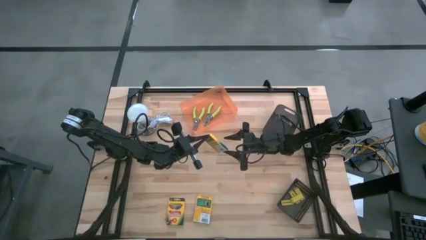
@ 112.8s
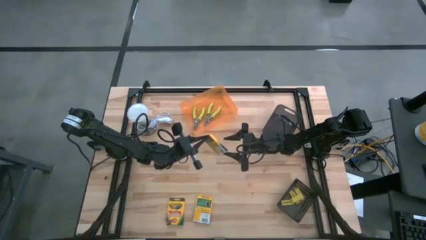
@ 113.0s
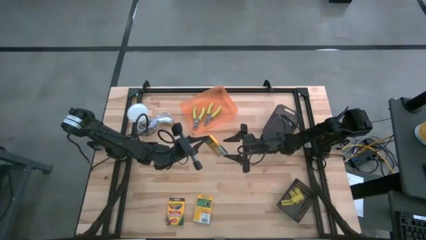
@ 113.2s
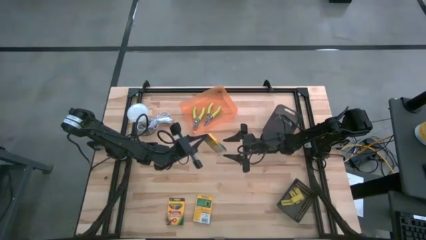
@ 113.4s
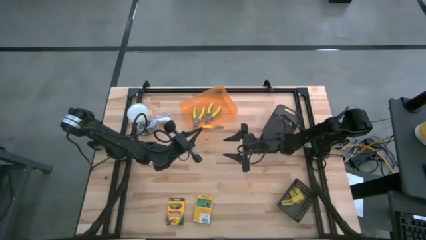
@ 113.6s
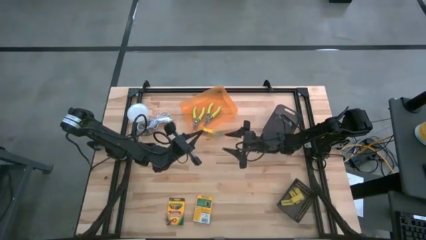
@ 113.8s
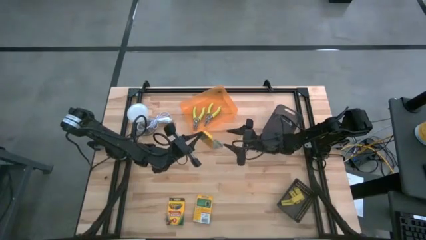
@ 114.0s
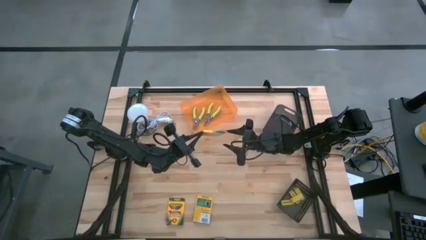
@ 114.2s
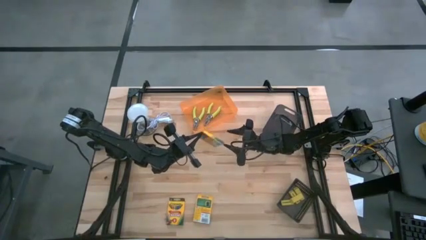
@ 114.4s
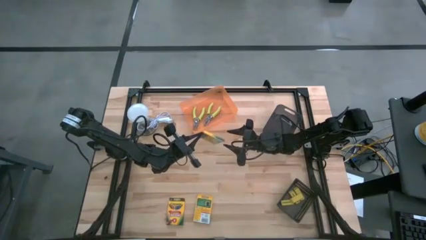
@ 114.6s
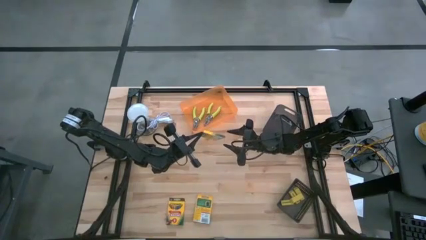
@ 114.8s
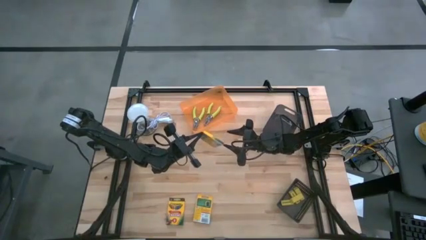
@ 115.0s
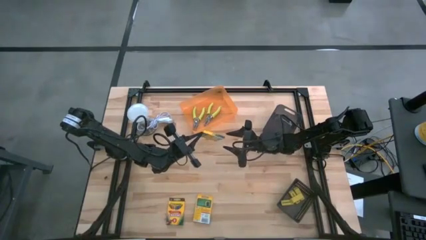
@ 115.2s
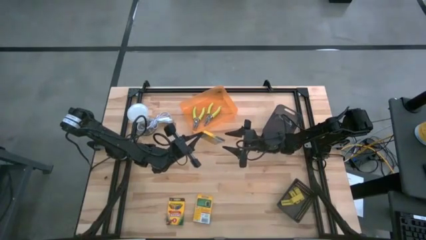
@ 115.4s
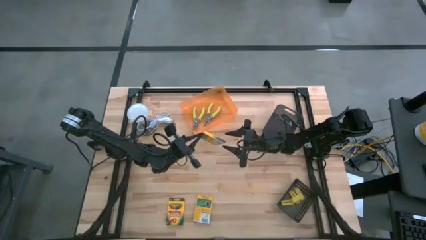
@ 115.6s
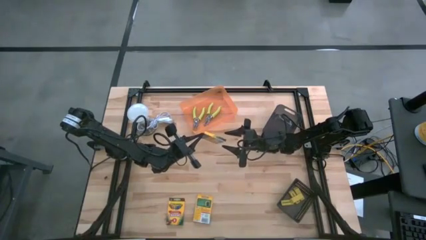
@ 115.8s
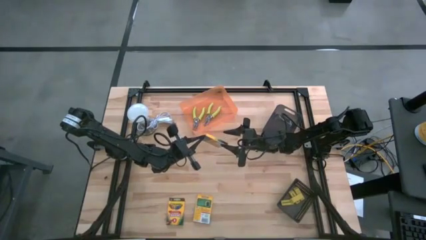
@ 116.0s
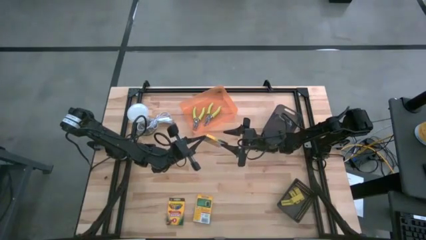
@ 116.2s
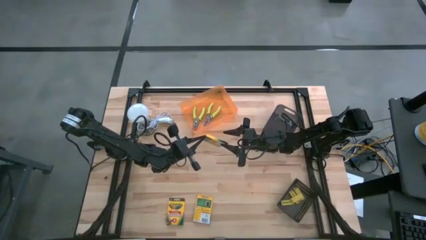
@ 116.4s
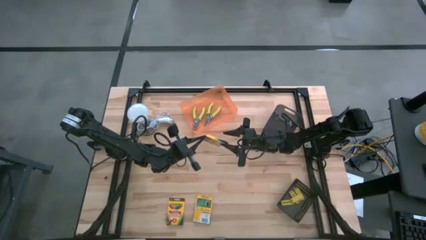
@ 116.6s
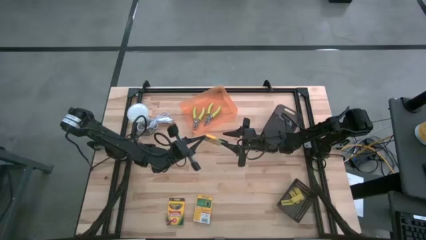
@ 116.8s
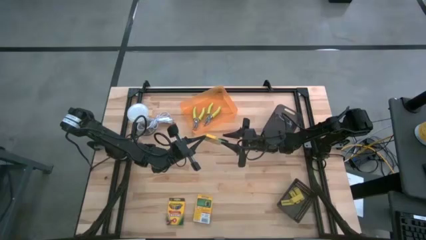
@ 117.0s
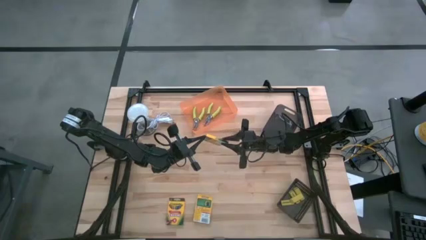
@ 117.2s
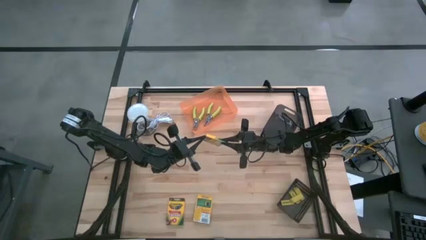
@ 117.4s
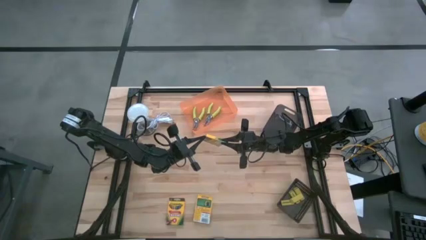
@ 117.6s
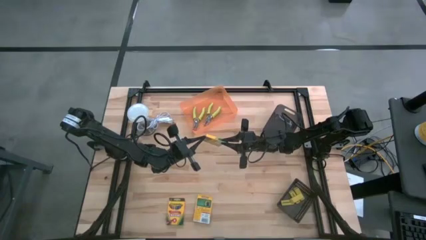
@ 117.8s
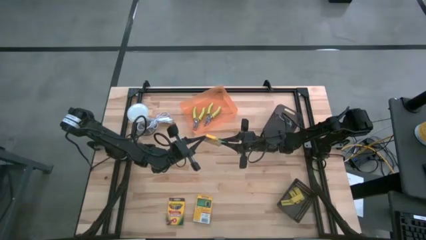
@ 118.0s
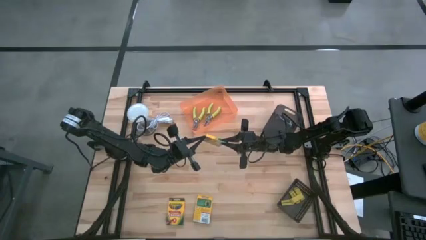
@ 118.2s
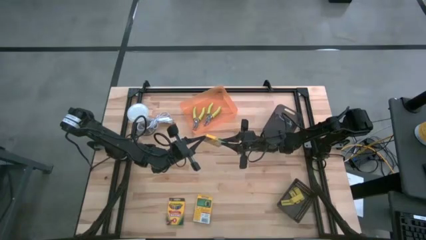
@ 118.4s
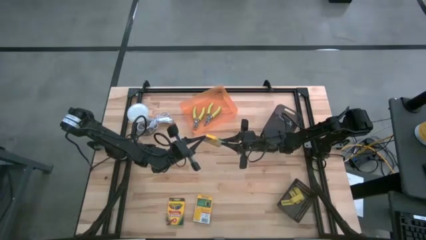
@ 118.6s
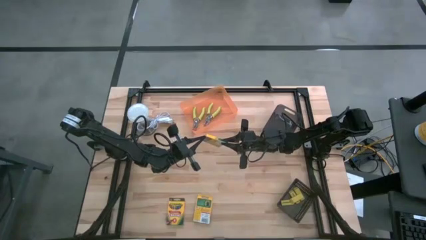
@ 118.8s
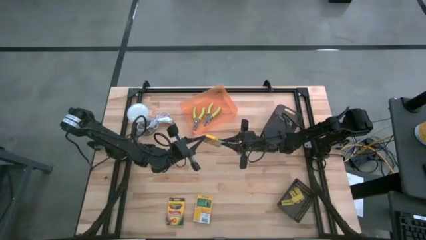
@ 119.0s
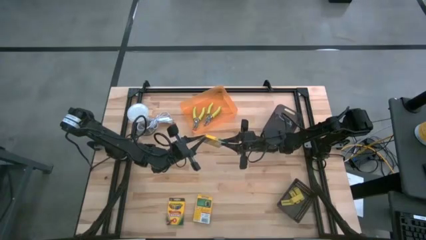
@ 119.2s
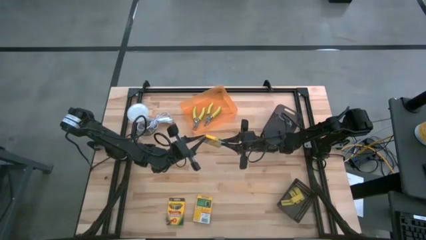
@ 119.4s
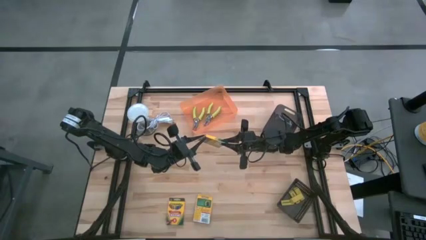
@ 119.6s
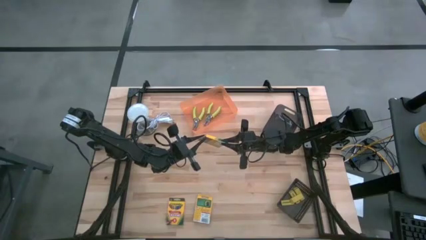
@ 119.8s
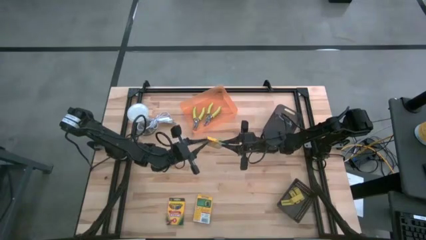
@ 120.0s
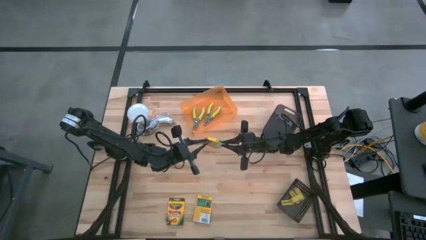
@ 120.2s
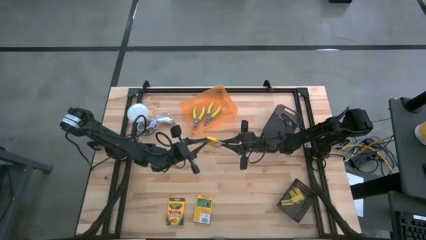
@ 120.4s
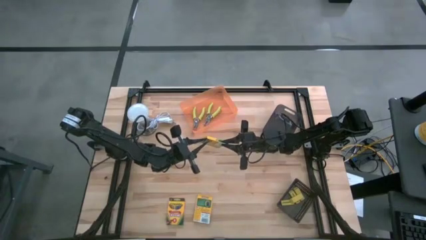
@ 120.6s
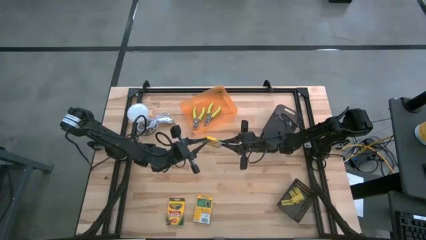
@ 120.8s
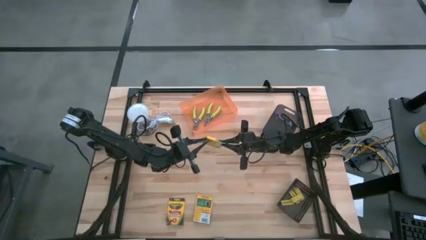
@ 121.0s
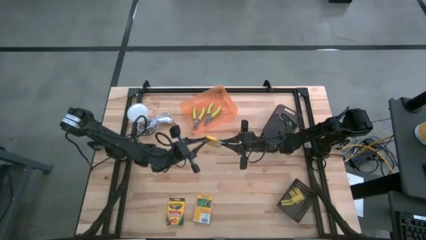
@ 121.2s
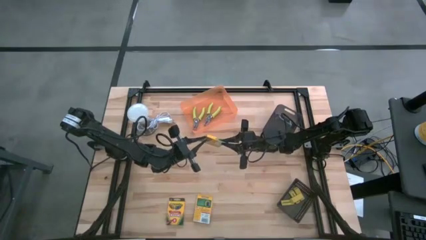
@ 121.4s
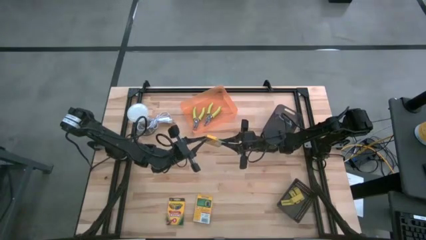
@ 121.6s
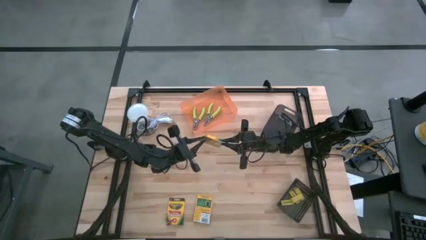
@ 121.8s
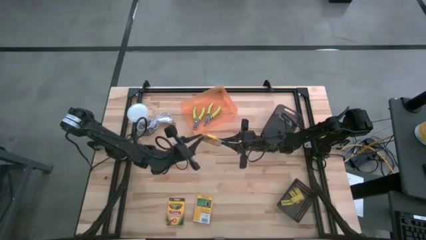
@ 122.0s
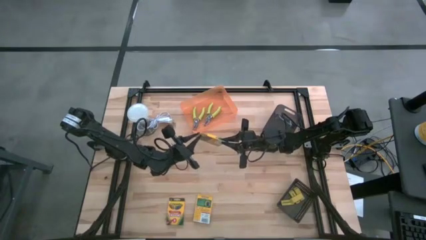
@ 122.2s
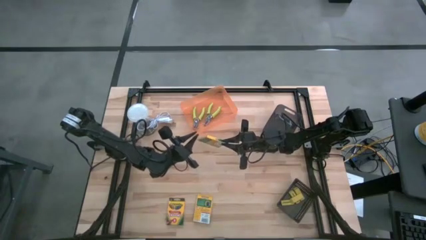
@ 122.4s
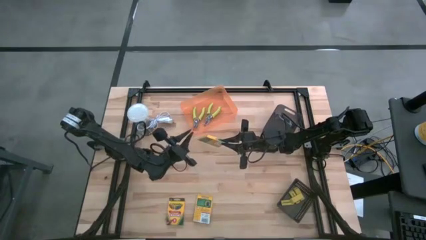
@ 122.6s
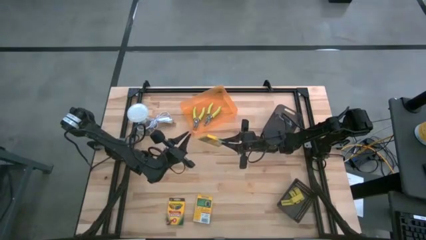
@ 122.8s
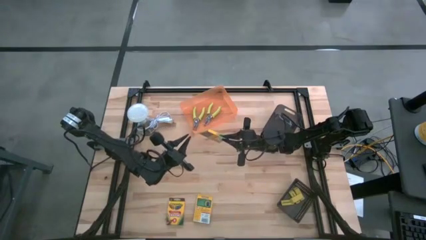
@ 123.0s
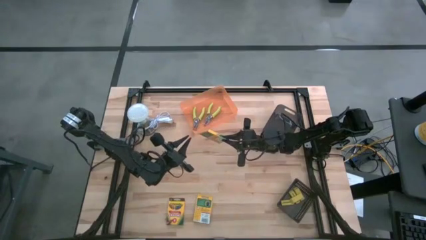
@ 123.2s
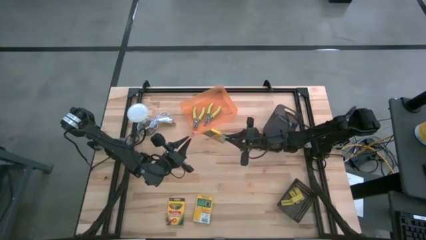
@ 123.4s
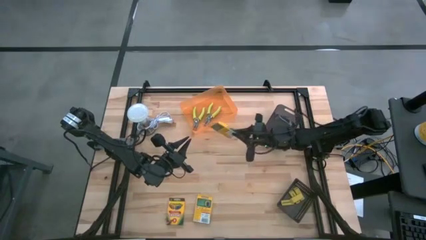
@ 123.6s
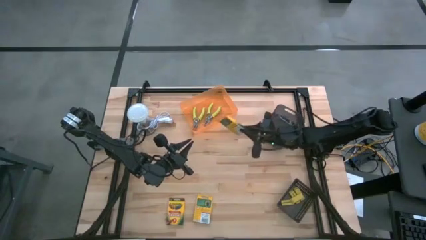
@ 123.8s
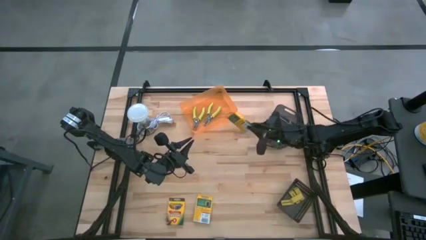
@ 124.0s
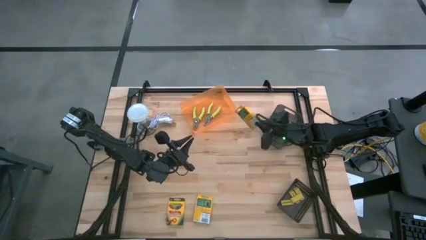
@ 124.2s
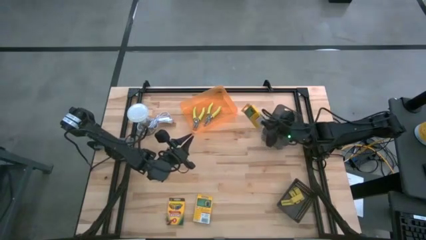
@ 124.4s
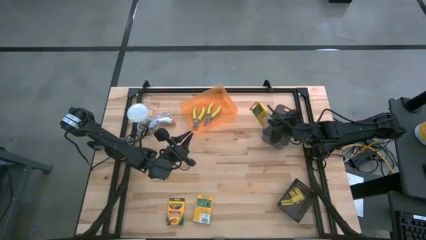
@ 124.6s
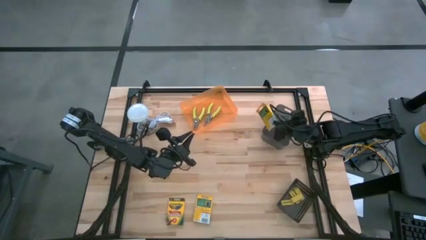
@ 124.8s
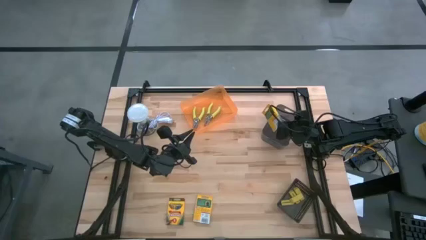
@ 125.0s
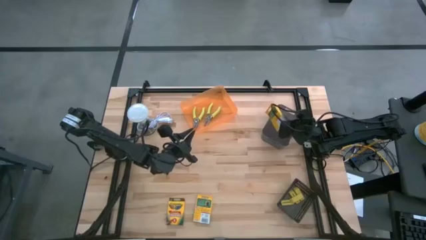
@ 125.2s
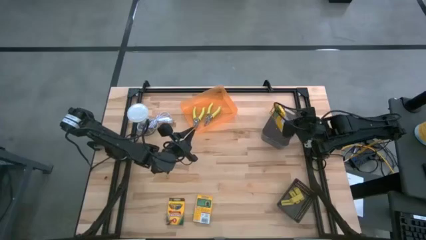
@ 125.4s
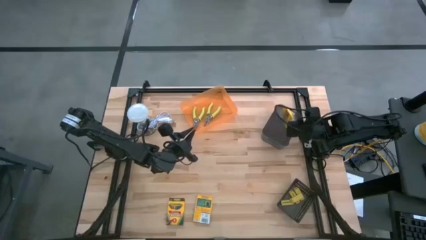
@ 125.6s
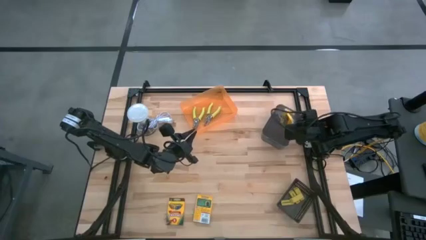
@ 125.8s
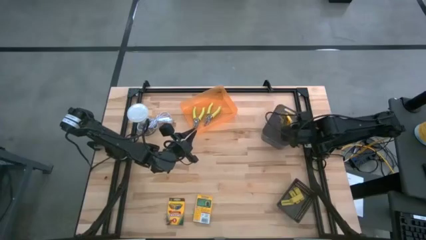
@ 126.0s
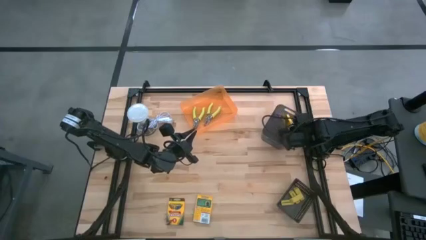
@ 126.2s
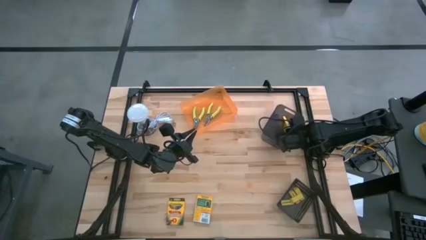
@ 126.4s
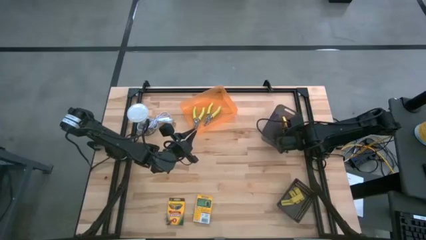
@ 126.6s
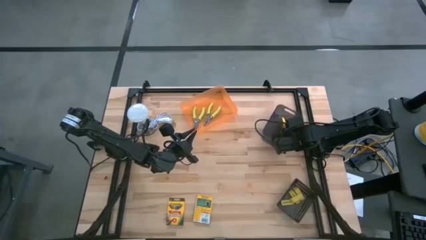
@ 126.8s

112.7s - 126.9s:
Task: Pick & Place School Supplies
Put the crayon box into the light black bin

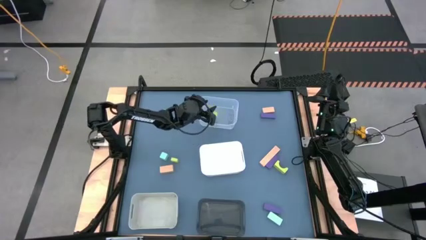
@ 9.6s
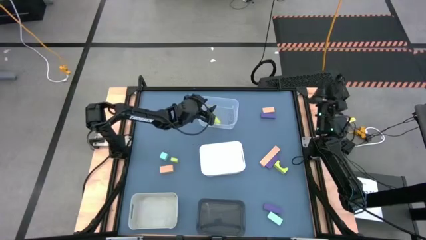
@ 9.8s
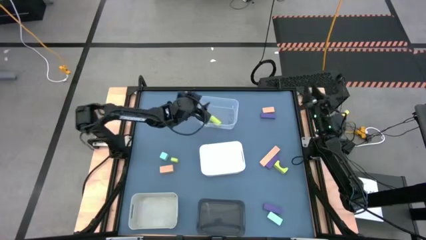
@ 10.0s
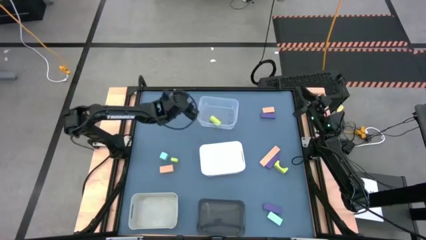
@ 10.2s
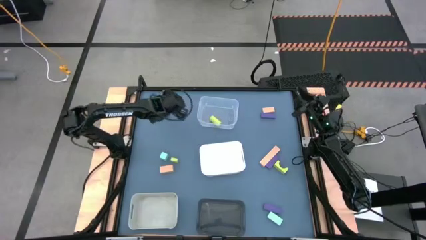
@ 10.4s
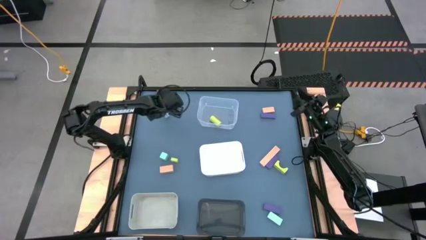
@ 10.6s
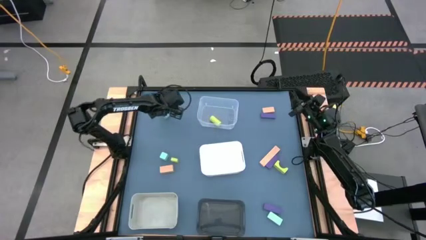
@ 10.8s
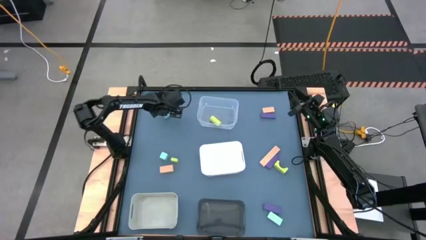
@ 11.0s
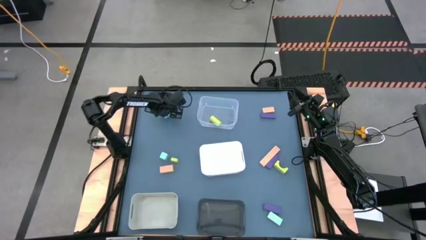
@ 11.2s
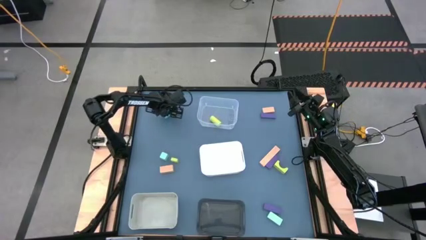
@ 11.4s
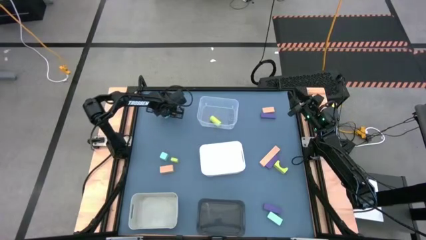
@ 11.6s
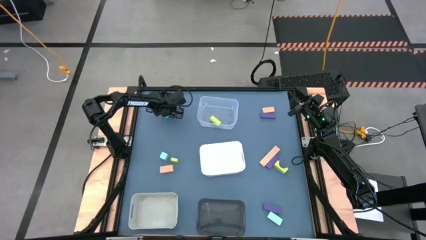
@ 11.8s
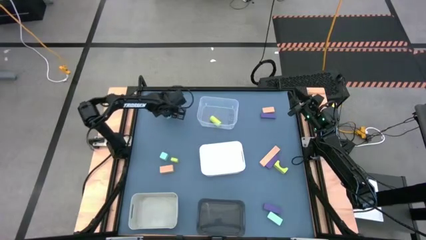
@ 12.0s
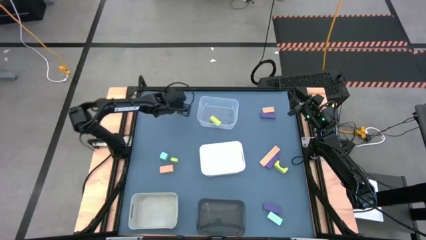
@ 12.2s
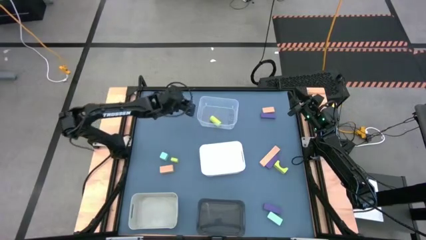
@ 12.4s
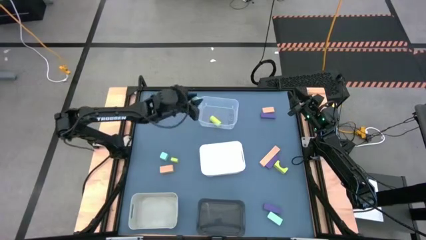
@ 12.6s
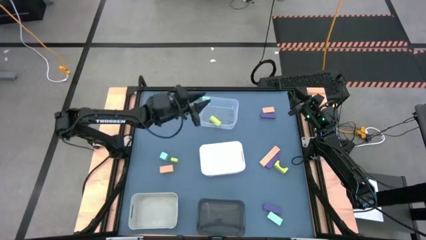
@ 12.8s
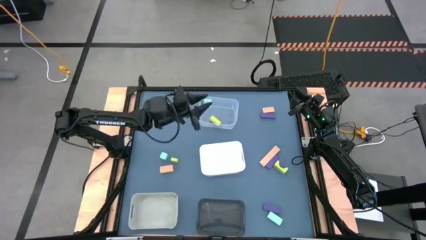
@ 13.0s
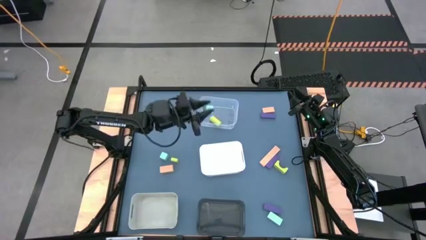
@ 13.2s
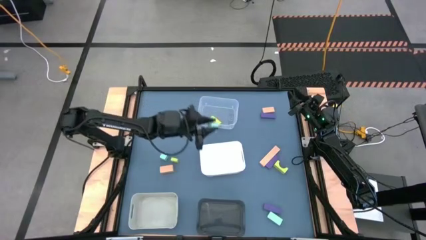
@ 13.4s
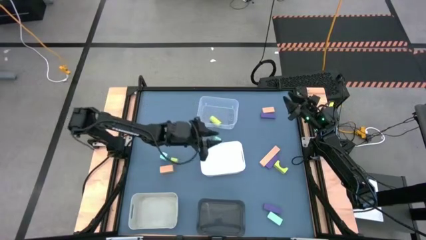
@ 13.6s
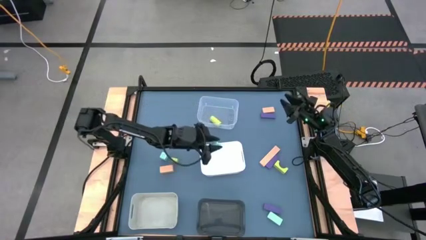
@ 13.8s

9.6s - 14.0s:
Task: Sort & place blocks by color
Put the top blue block into the white bin
